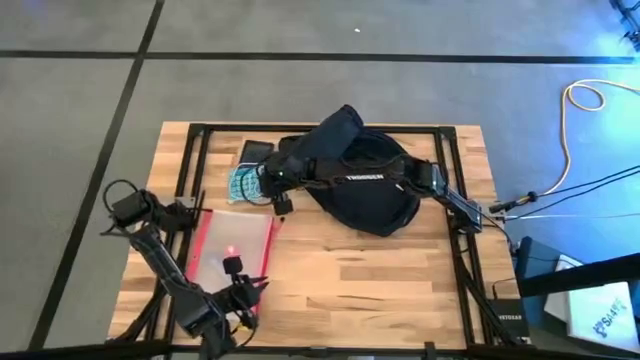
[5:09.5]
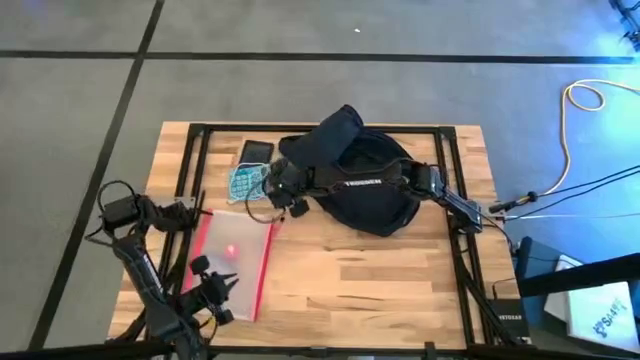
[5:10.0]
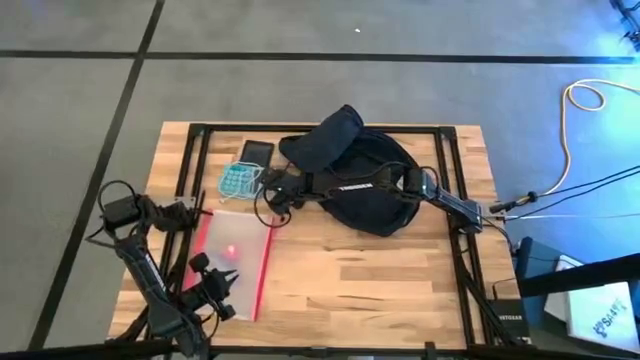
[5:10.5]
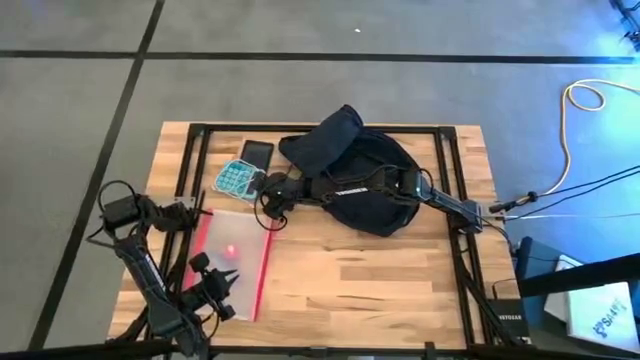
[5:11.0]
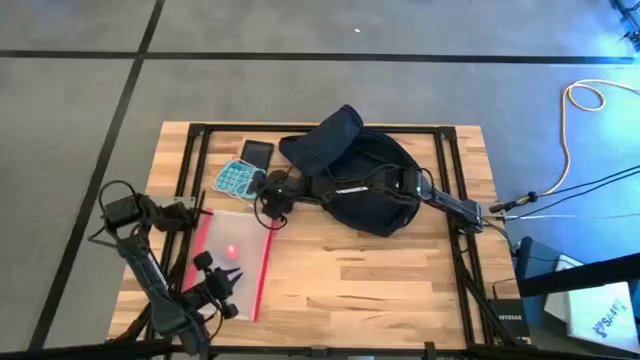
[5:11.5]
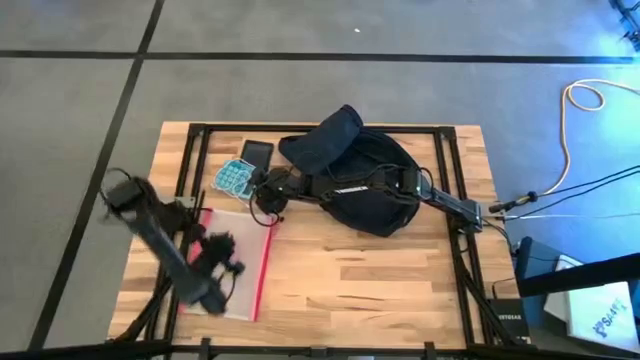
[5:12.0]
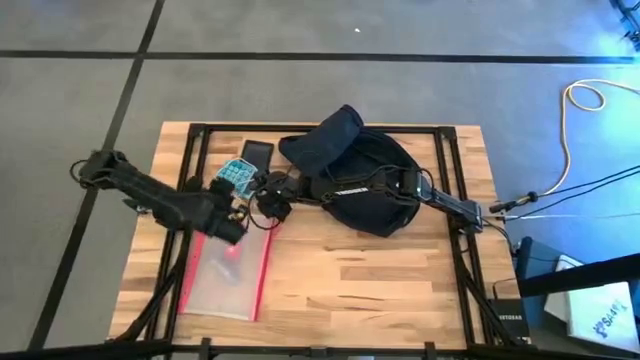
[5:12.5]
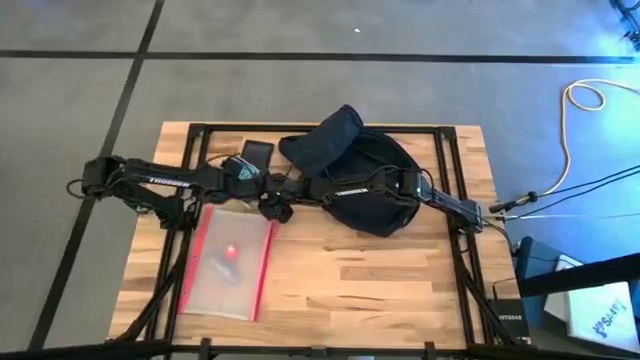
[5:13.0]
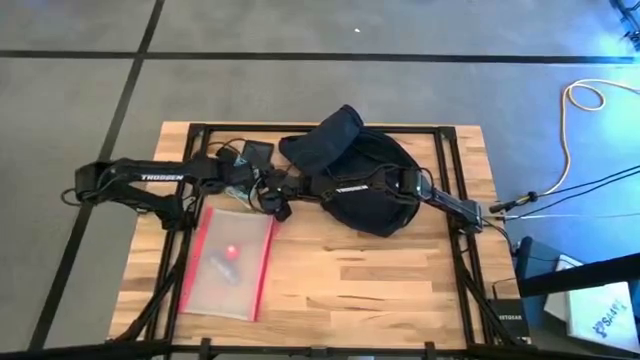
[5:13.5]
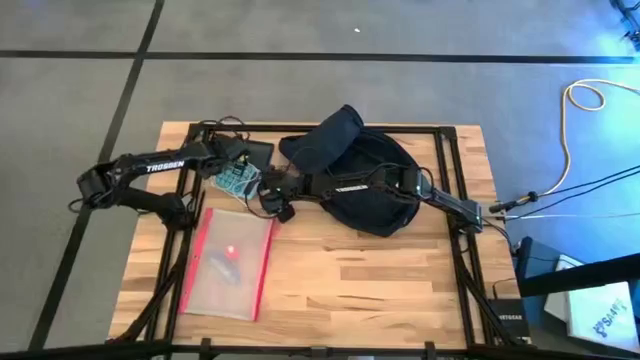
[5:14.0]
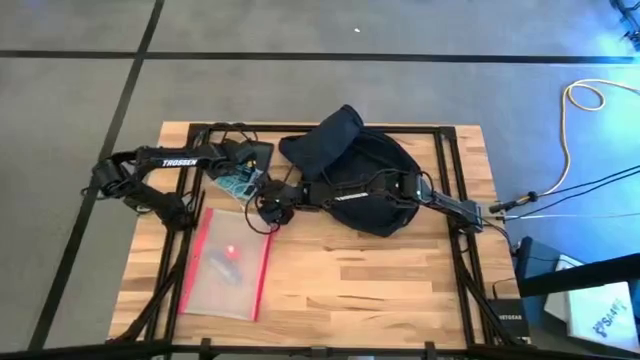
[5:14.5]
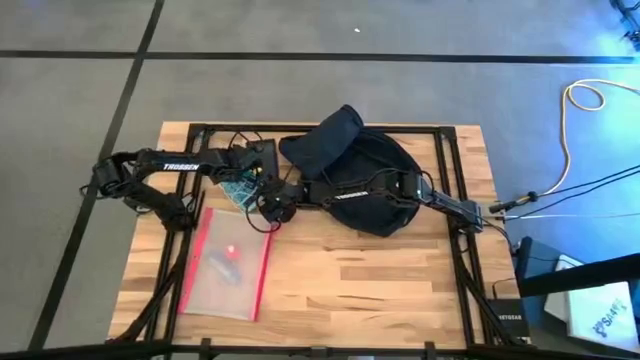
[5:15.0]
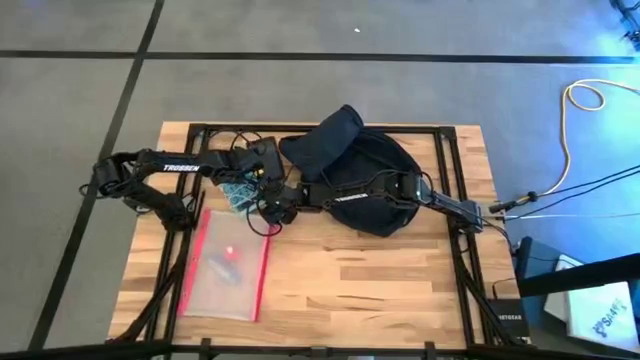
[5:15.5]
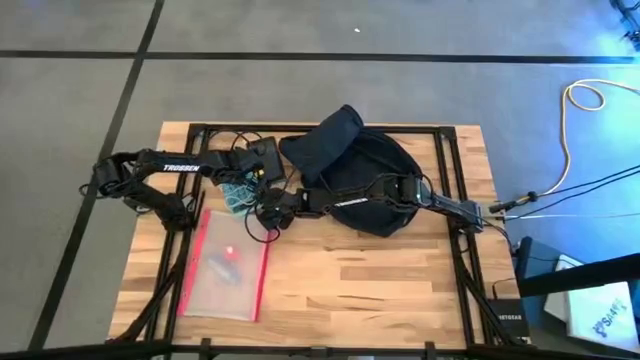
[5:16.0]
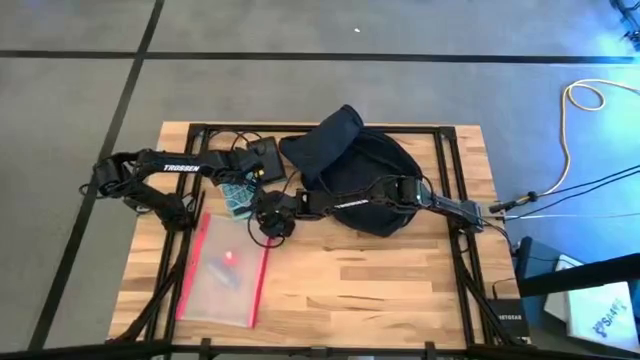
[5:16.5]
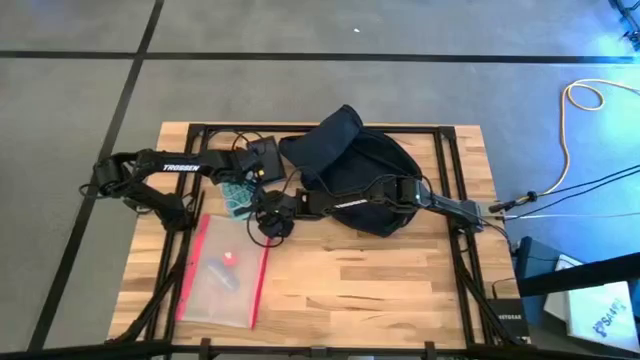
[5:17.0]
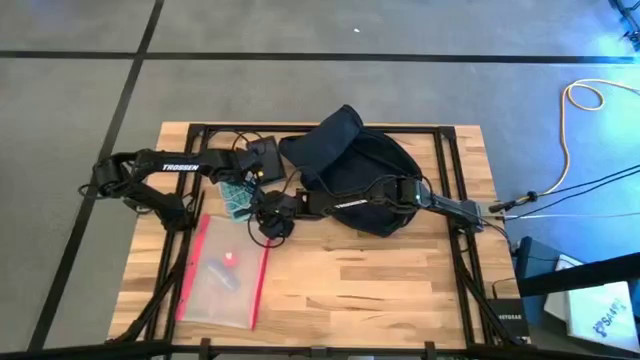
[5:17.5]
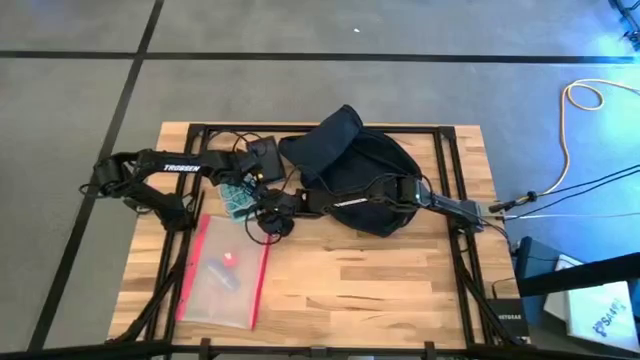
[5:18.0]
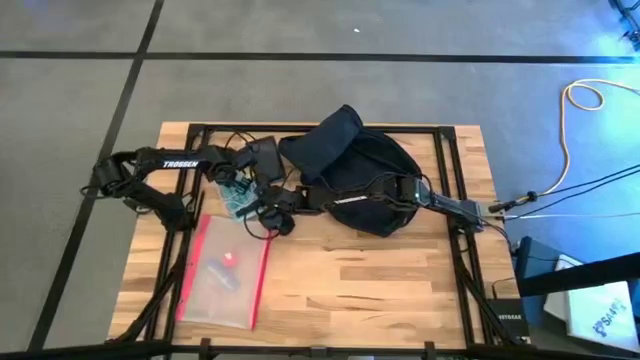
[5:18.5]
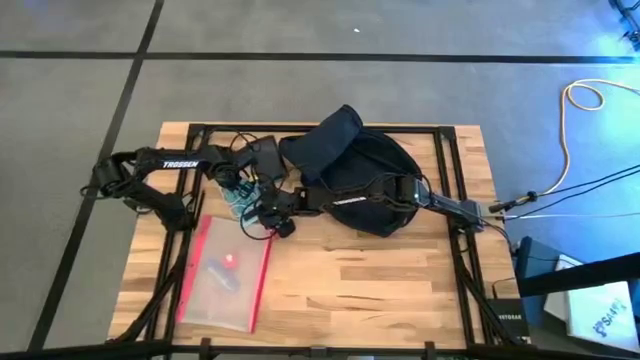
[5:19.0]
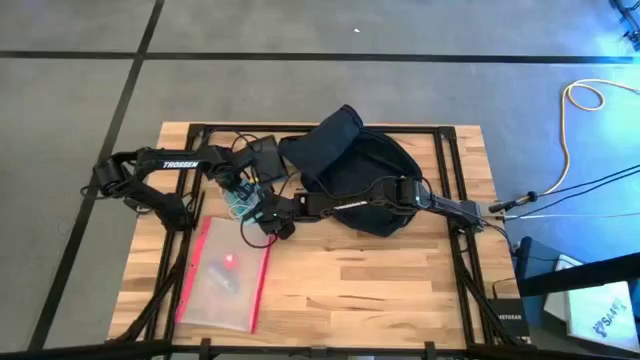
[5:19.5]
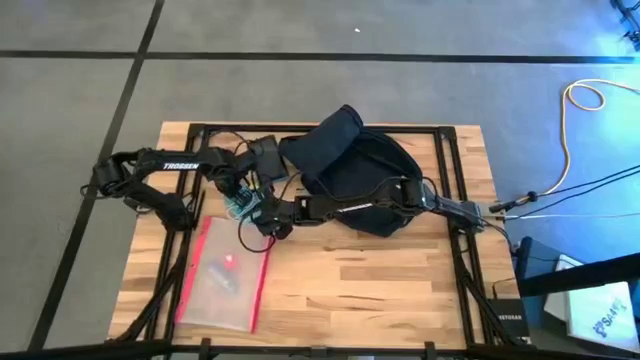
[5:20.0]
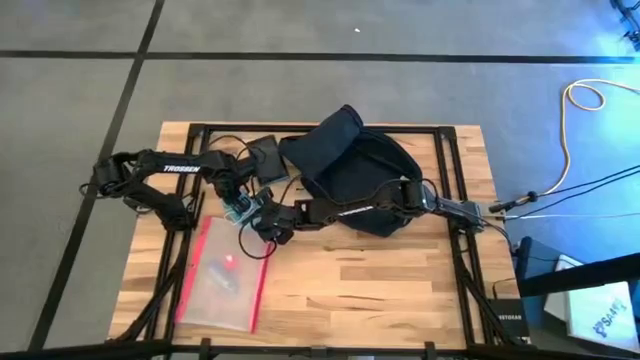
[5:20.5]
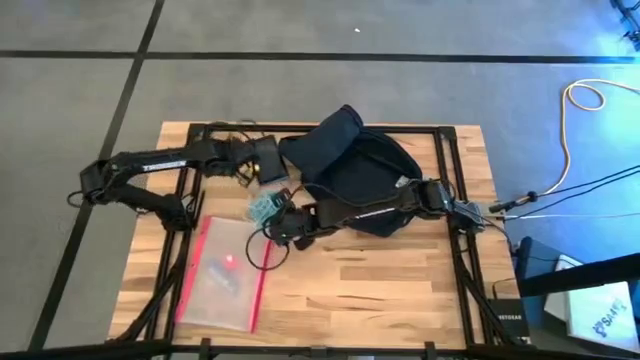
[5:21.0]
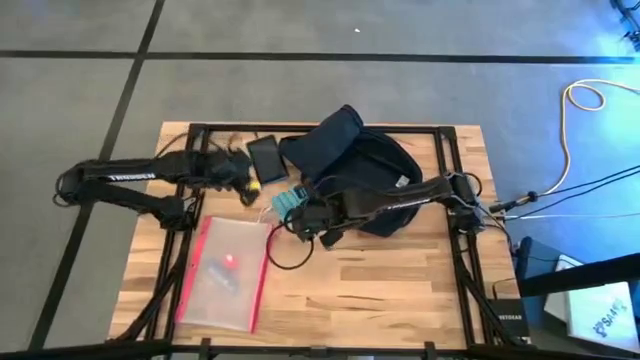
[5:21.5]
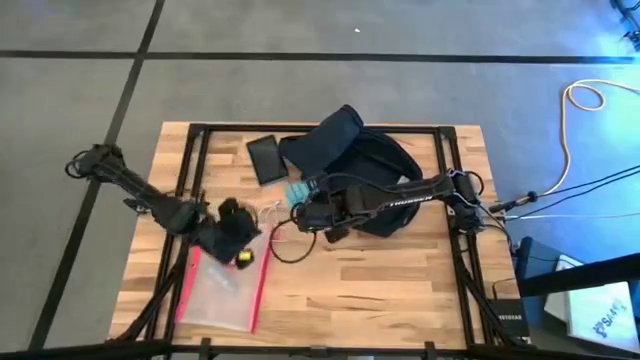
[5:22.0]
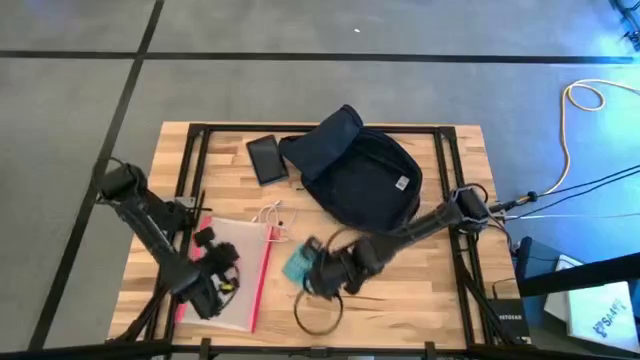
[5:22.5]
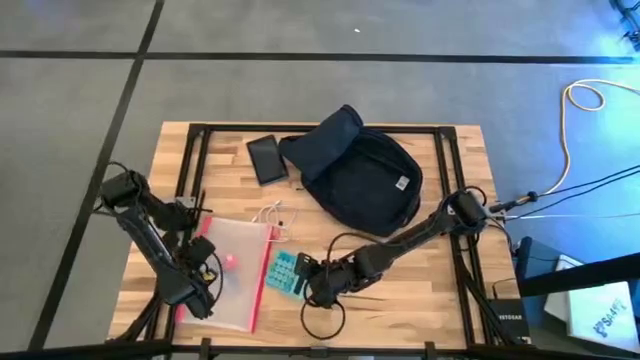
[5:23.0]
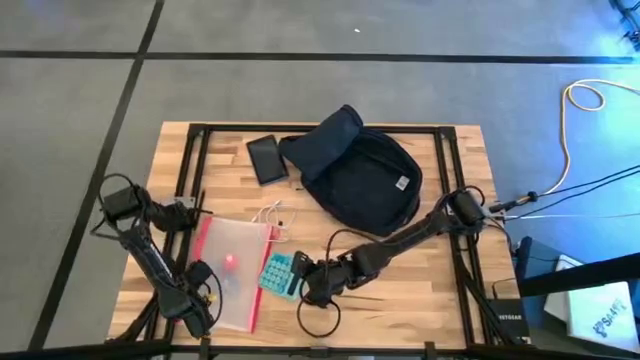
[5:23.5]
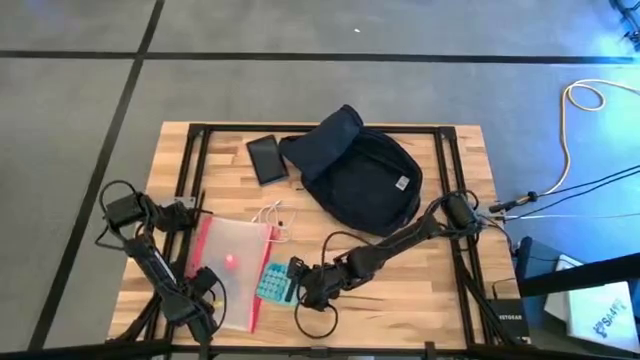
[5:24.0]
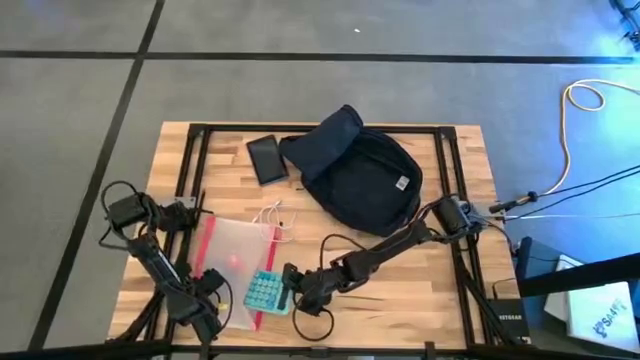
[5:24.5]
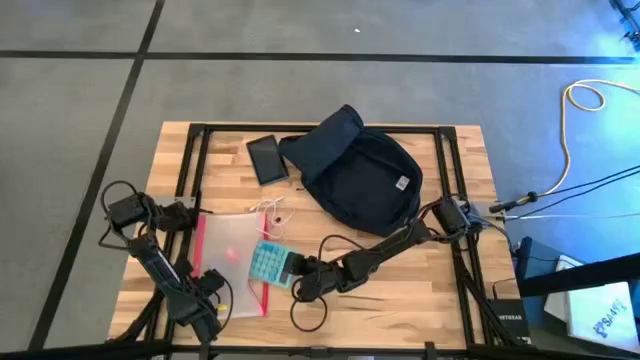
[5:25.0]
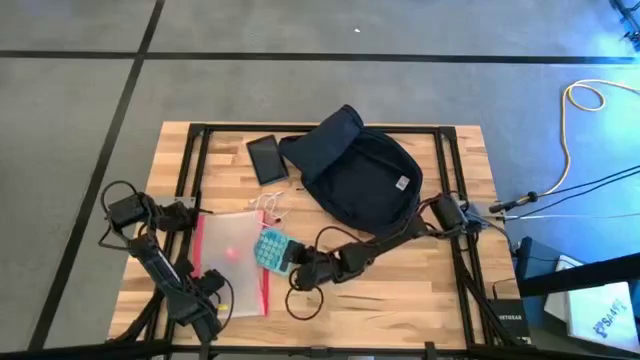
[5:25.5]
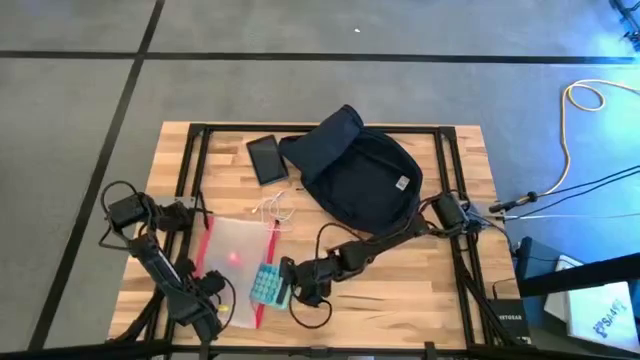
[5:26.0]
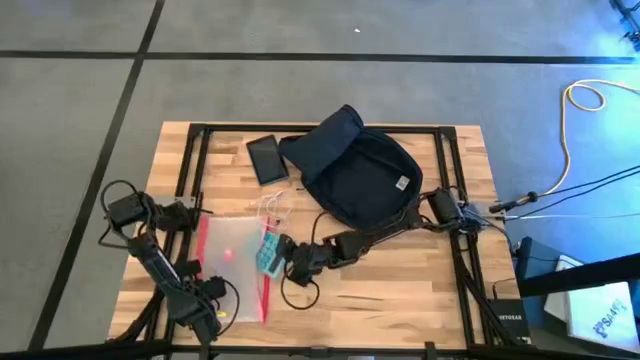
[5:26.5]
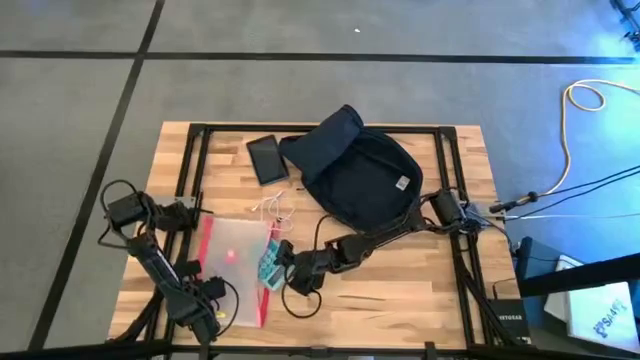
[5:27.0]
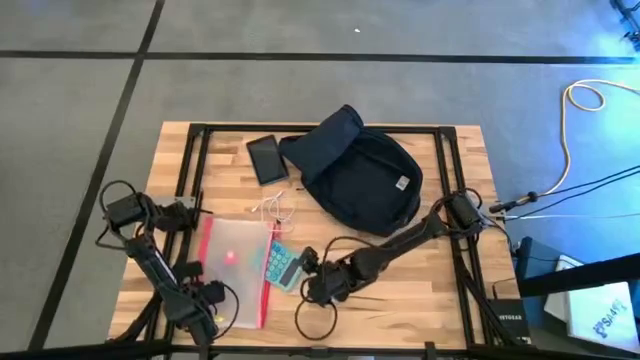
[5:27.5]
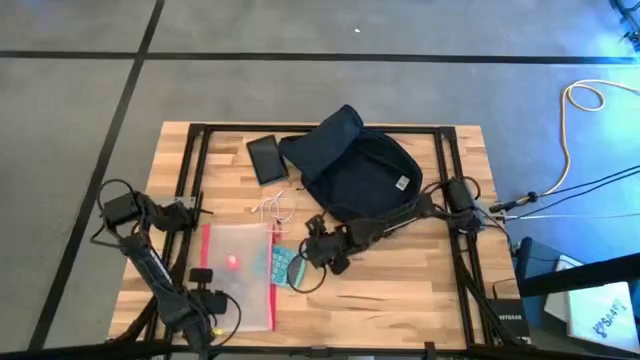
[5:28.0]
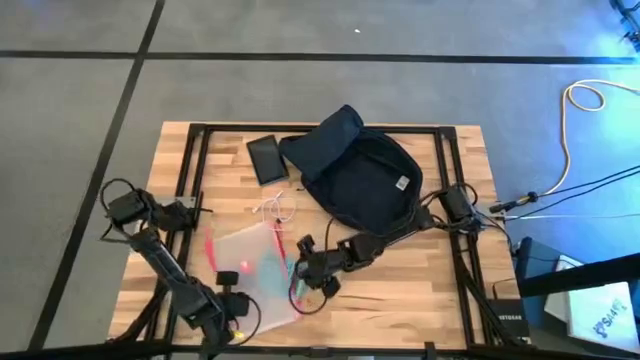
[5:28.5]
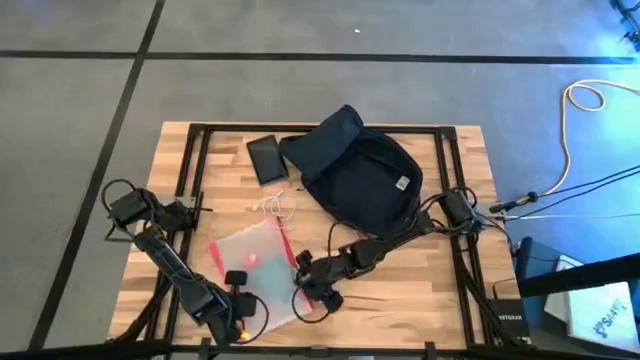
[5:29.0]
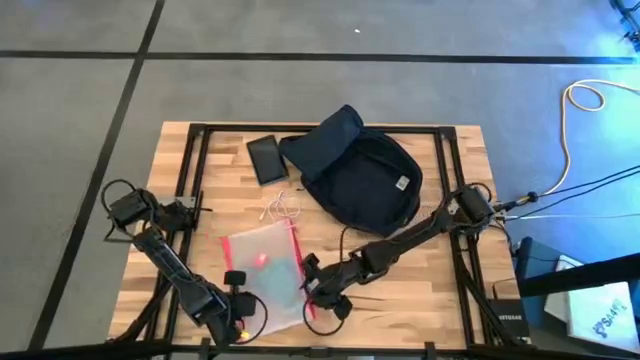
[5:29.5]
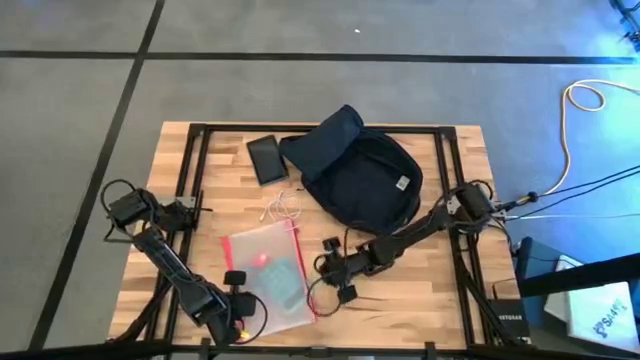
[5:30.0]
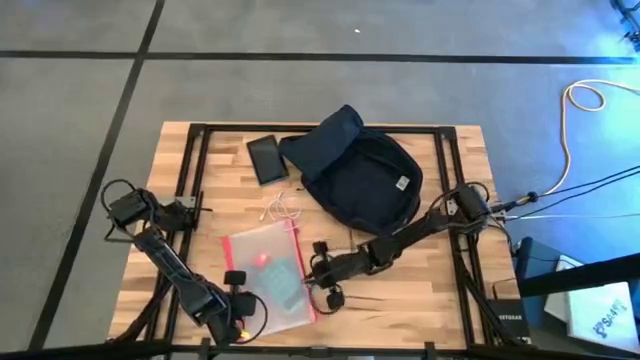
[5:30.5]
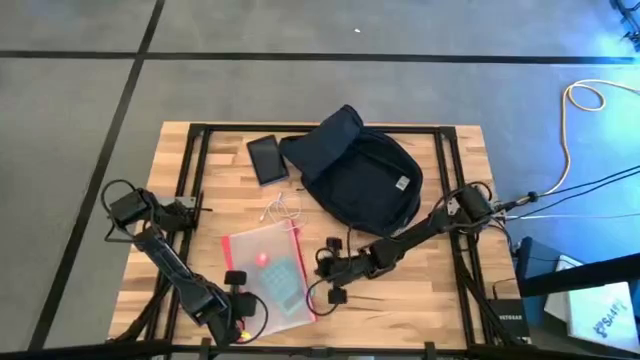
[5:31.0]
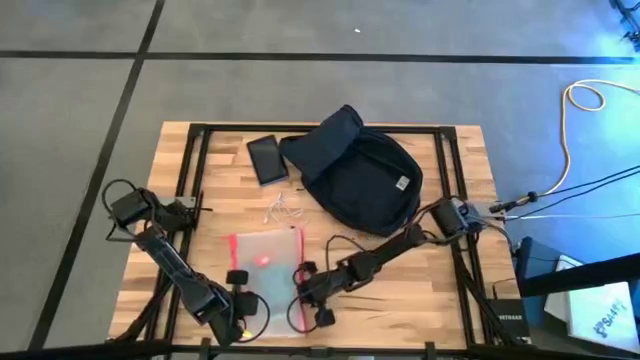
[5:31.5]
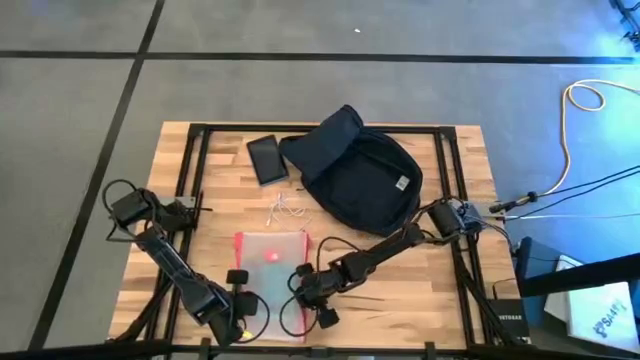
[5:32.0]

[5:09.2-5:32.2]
Task: Unpack backpack
Put the blue calculator into the zip bag
